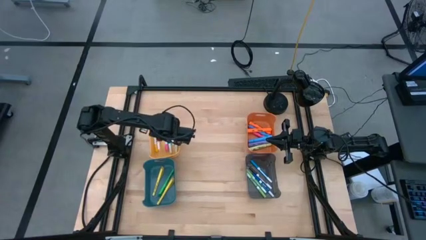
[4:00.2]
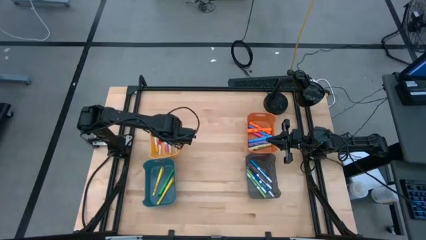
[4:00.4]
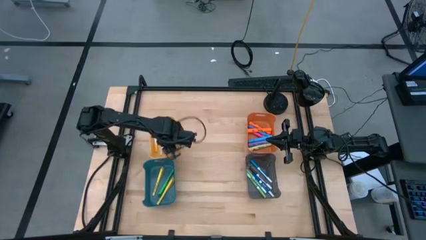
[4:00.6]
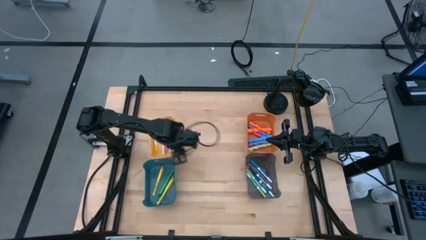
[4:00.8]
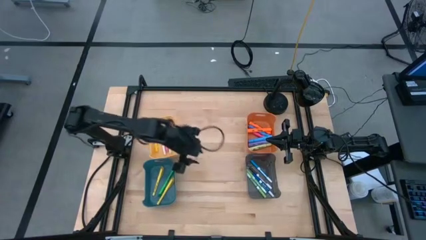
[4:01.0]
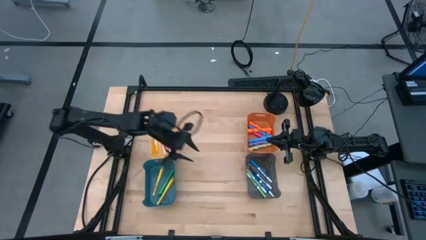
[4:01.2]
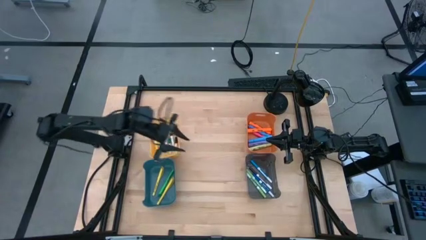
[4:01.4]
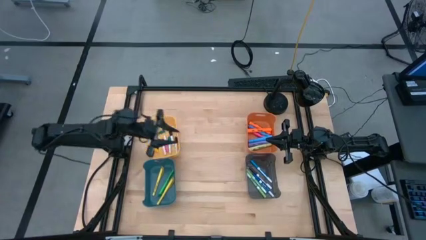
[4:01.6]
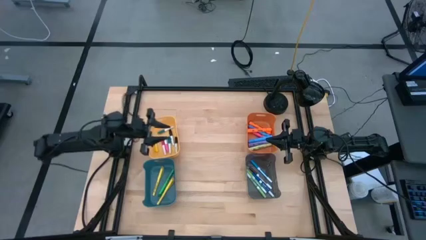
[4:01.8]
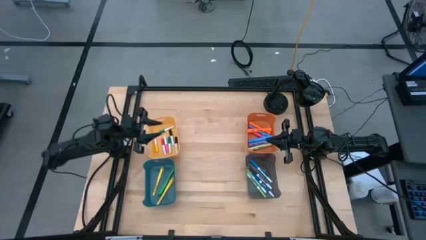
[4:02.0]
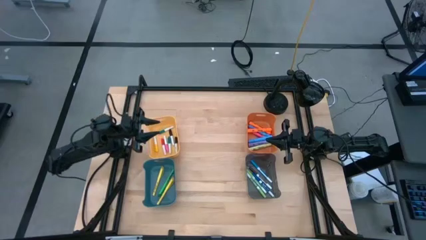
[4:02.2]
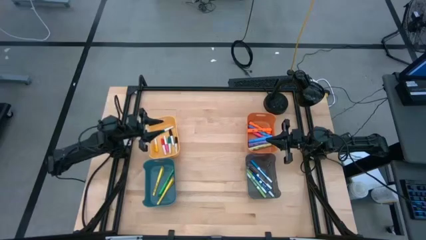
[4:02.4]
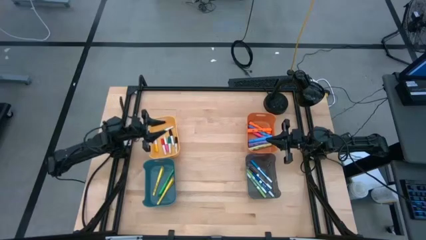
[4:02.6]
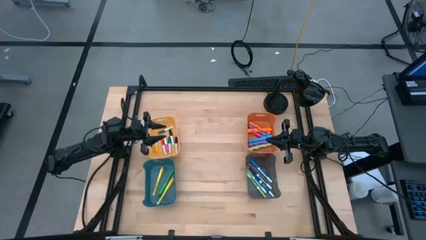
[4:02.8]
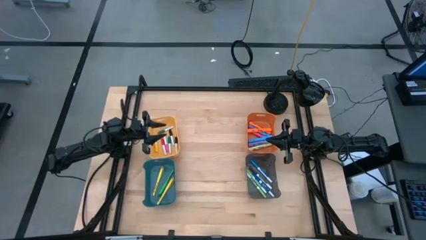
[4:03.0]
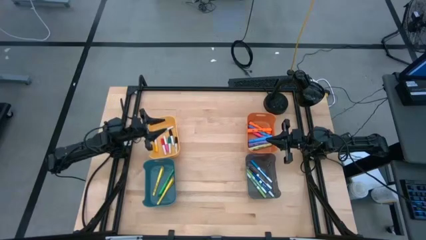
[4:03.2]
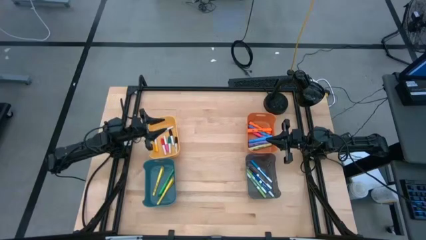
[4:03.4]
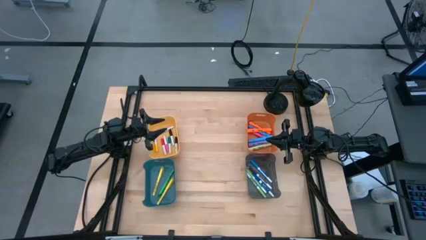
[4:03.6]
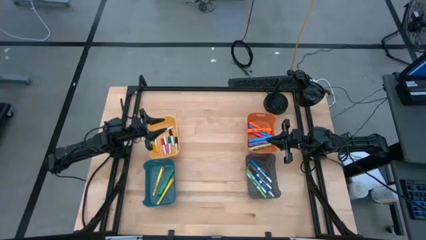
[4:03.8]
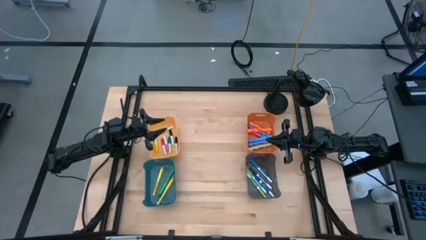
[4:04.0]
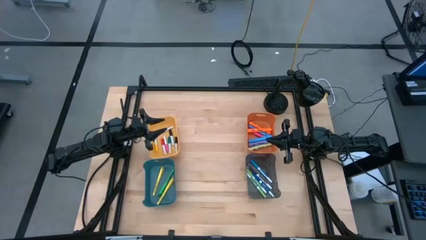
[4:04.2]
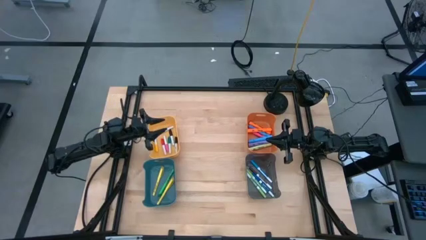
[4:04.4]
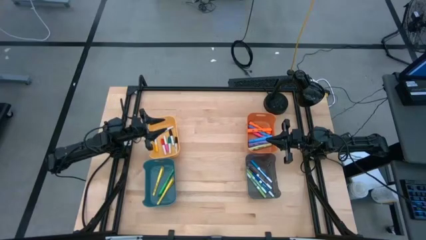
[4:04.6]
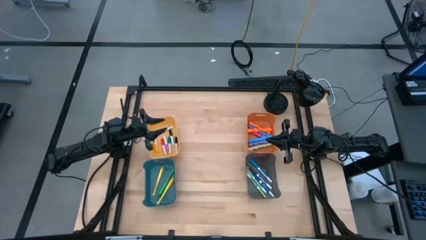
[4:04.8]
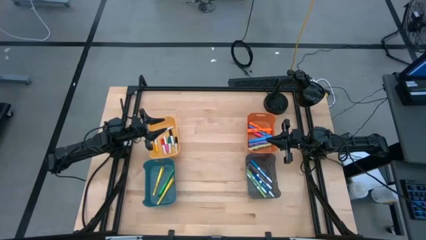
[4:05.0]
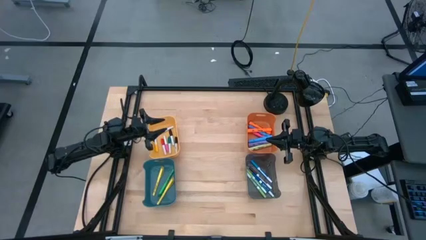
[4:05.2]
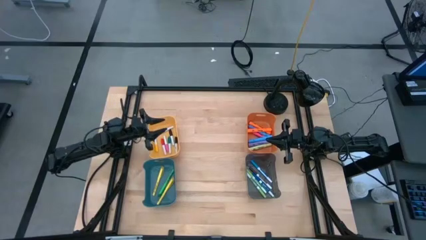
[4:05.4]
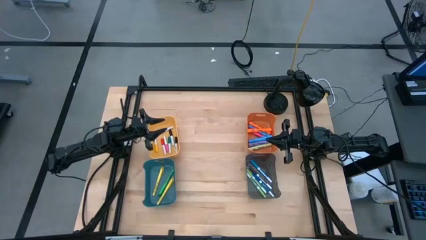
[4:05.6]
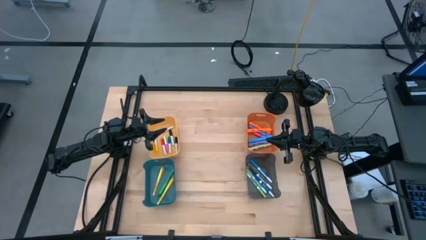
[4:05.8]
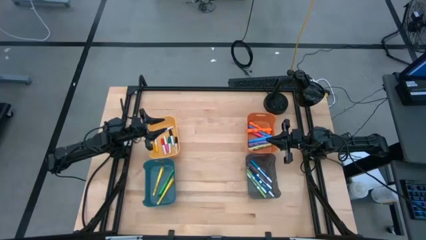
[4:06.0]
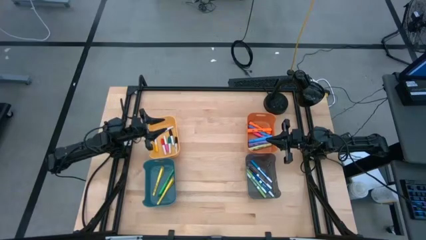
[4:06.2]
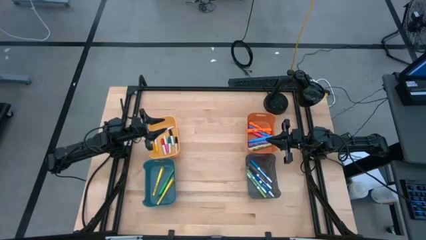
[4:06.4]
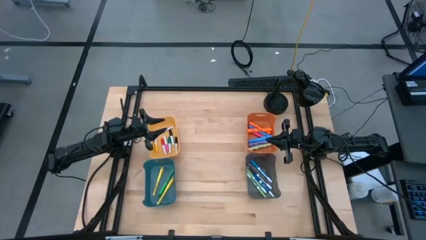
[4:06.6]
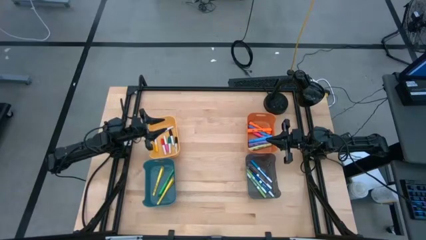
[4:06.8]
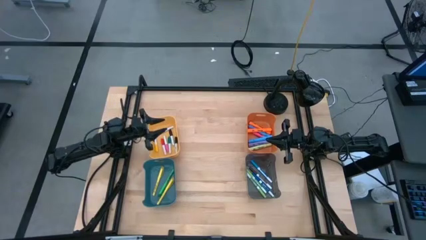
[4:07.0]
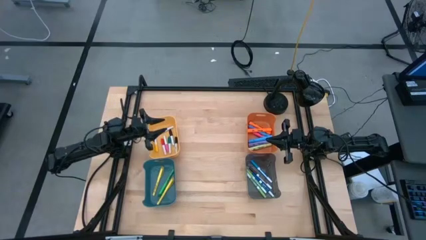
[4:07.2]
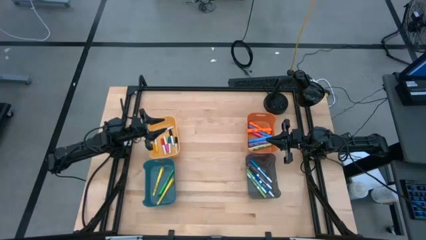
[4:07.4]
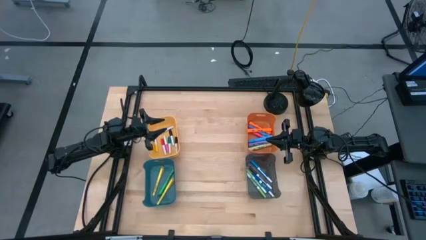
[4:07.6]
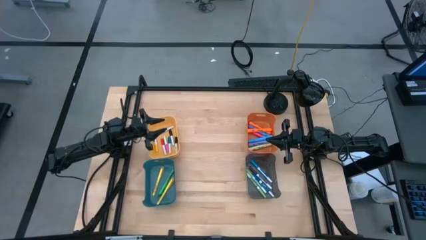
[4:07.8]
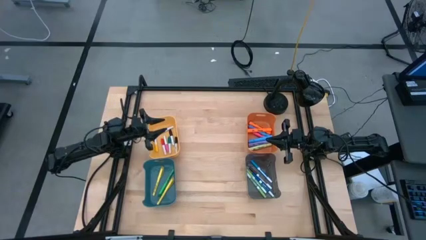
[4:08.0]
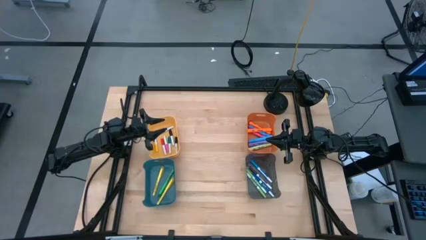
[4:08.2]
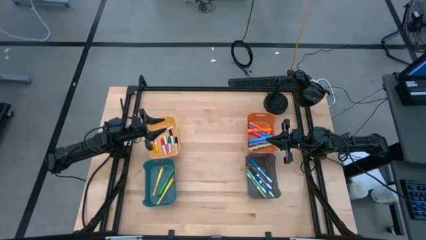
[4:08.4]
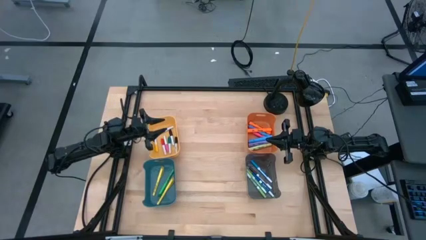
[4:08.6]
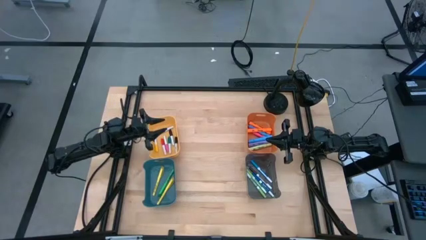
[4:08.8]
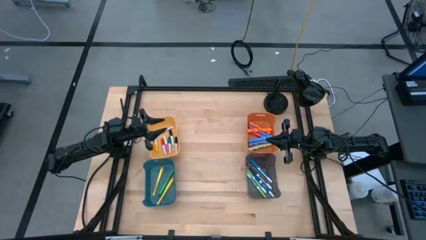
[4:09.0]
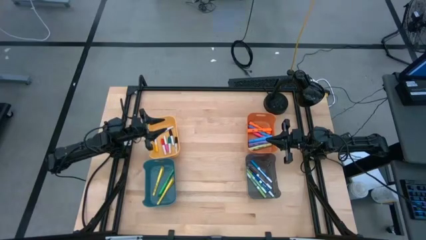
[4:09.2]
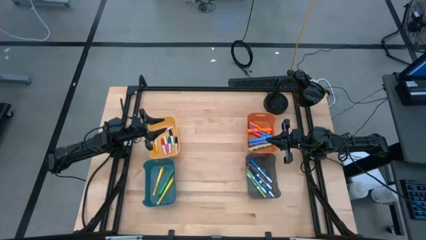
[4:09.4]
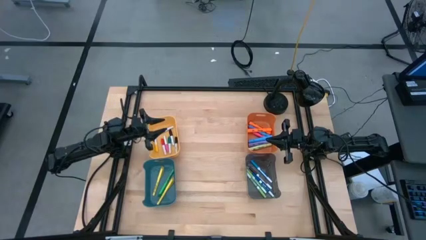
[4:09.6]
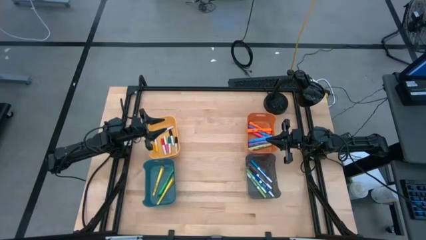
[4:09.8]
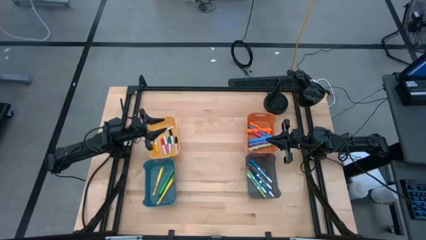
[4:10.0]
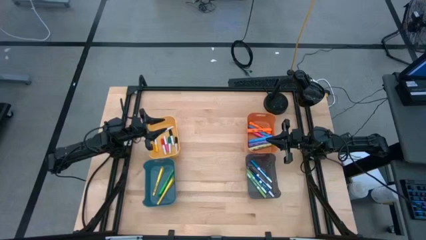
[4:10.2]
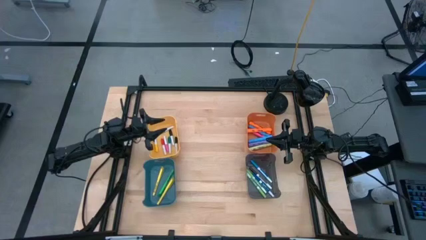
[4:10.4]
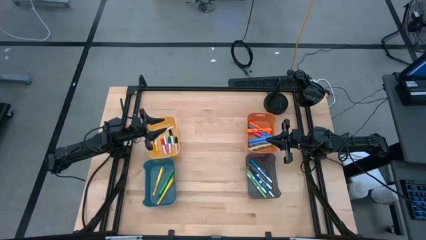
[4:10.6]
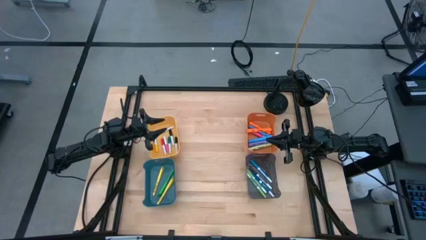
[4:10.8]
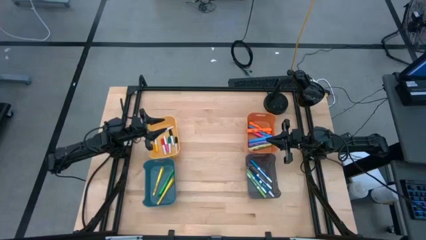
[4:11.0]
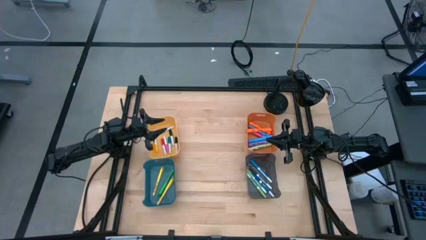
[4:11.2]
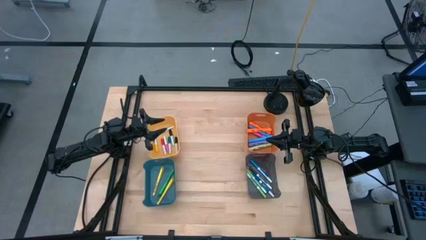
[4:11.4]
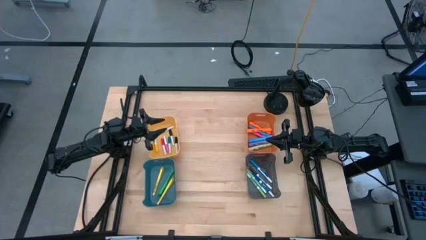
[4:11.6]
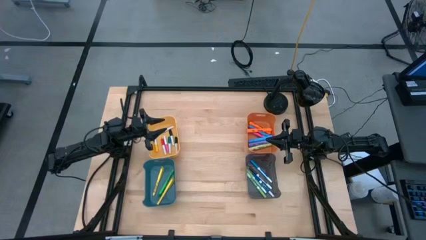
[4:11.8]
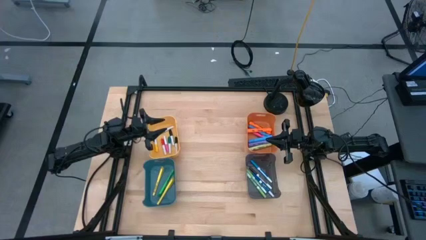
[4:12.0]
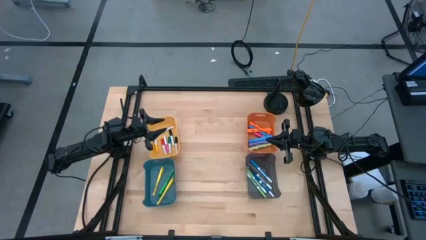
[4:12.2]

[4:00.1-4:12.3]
Task: Pick & Place Markers
Return to Home Position

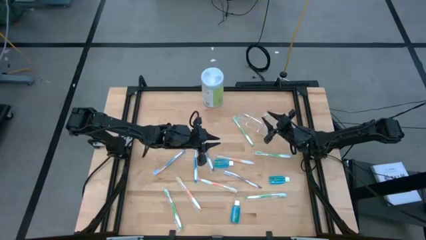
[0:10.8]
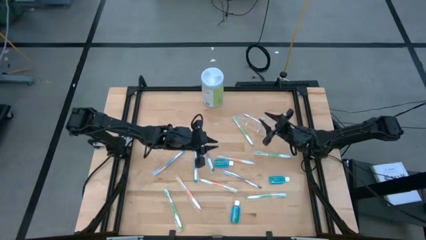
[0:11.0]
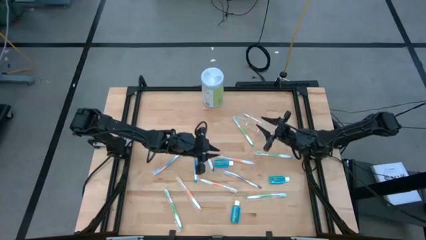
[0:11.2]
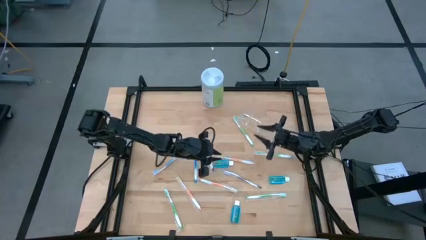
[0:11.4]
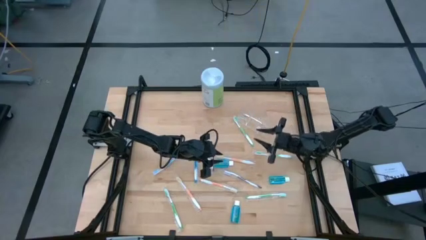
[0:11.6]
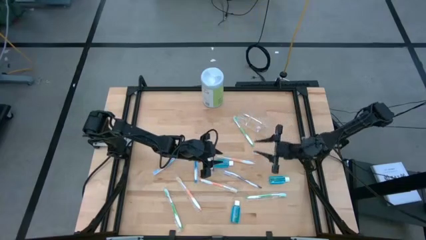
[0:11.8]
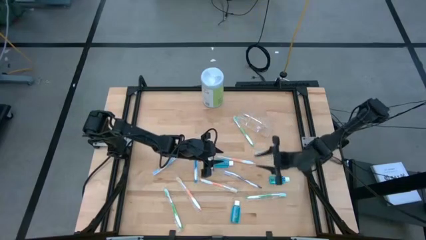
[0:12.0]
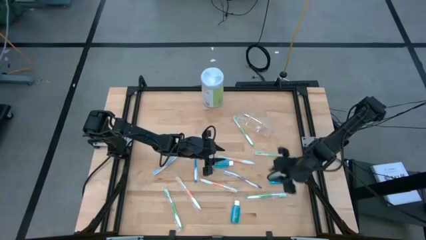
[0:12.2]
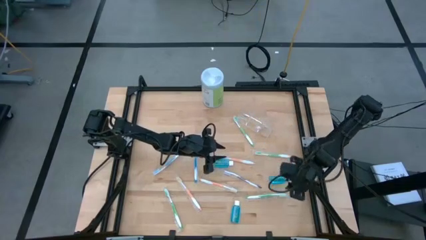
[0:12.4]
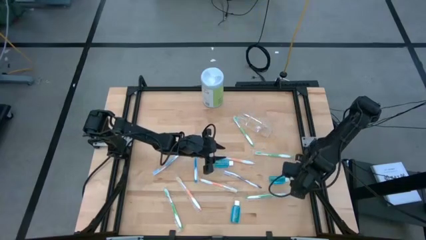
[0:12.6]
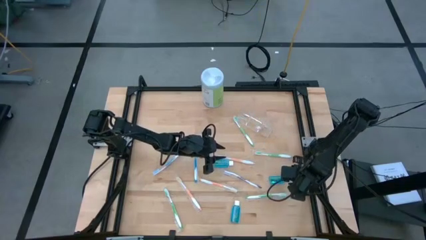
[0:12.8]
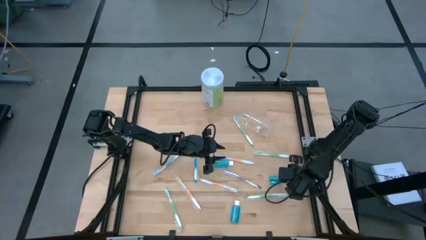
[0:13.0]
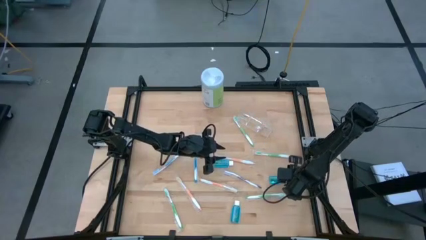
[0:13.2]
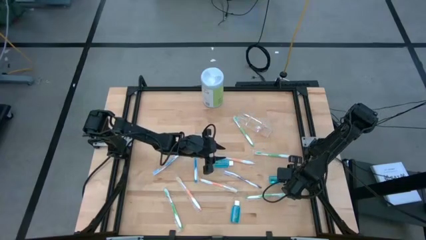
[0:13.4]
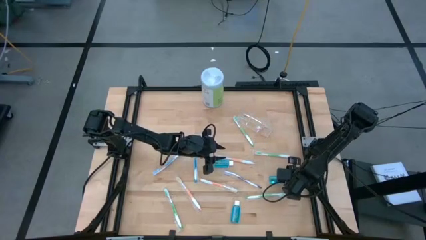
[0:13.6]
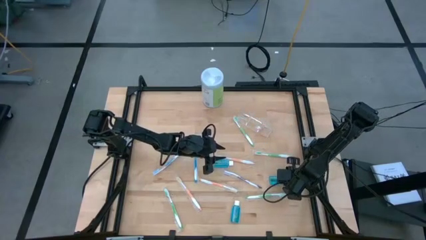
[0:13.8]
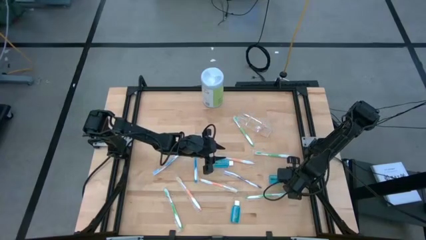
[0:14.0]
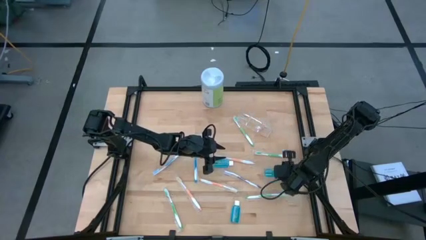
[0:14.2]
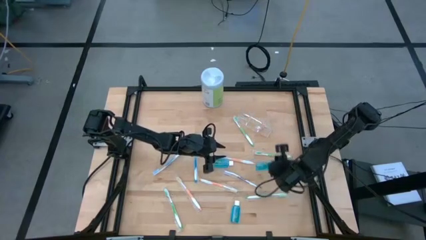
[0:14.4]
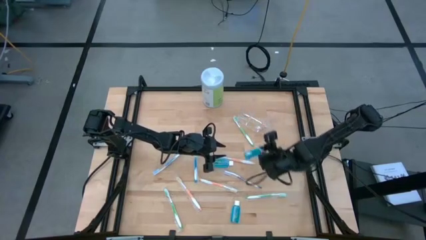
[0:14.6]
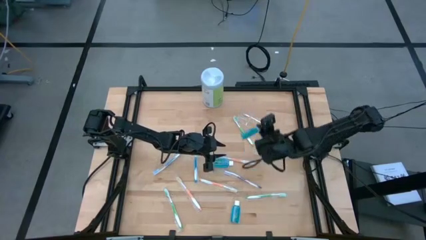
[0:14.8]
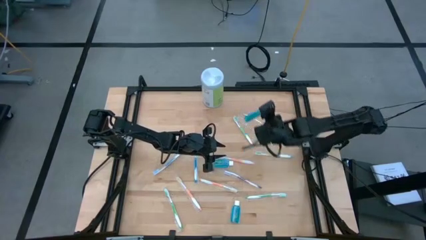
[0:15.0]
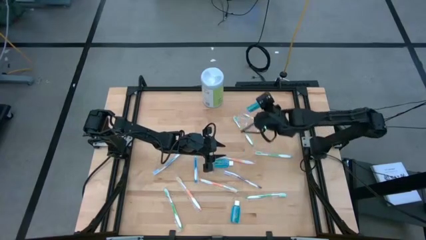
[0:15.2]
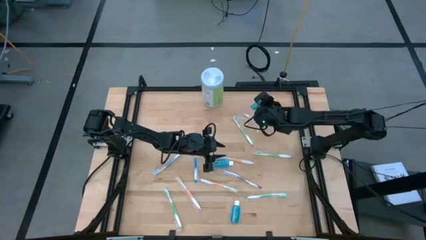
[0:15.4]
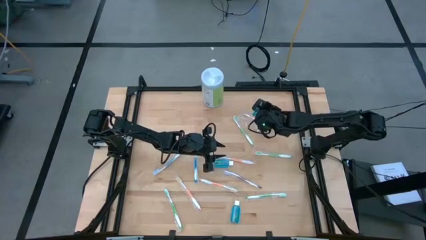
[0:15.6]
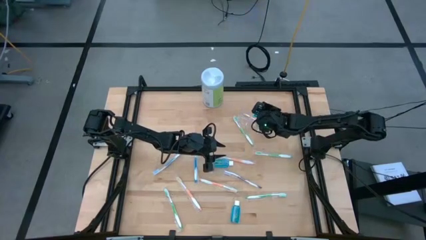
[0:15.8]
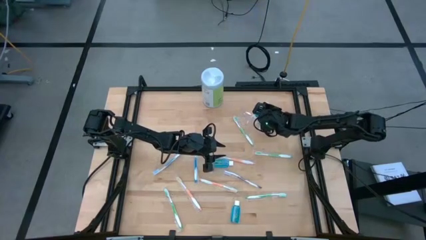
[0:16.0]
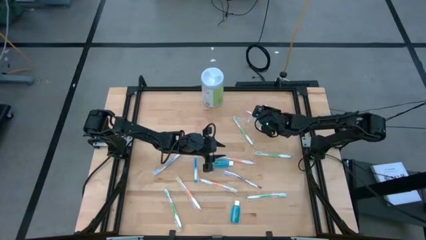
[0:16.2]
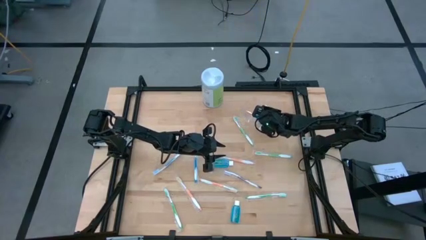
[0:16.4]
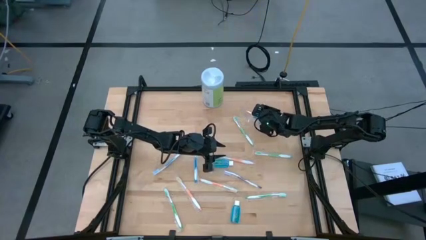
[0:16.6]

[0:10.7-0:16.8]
Task: Pick & Place toothbrushing station
Put the blue mouthwash into the transparent organizer
